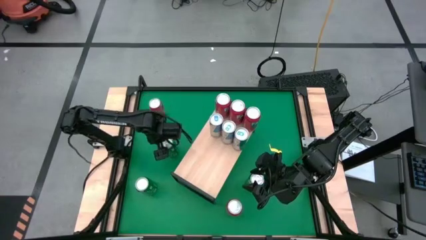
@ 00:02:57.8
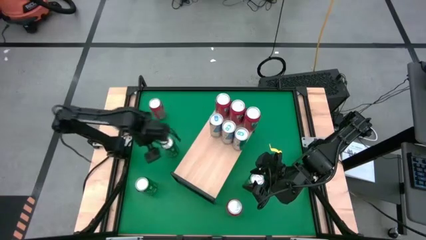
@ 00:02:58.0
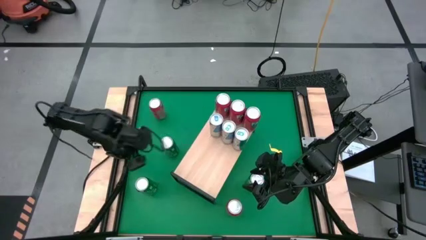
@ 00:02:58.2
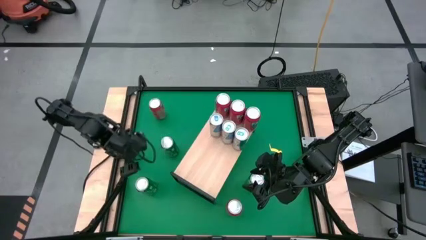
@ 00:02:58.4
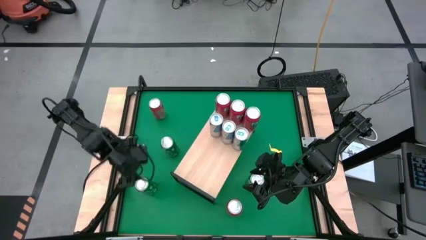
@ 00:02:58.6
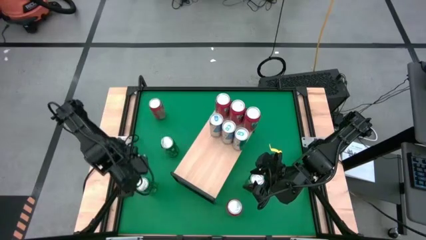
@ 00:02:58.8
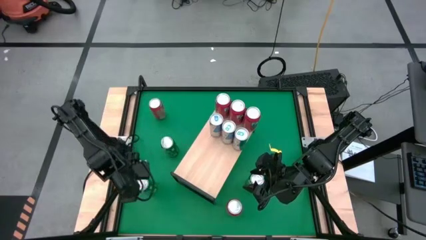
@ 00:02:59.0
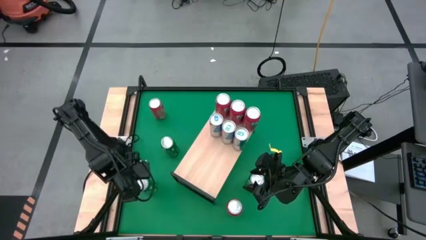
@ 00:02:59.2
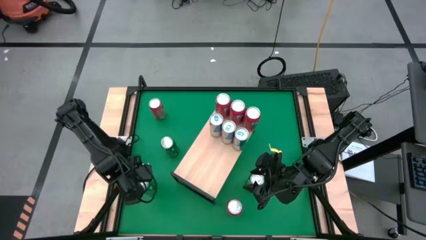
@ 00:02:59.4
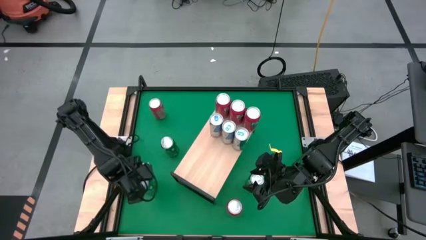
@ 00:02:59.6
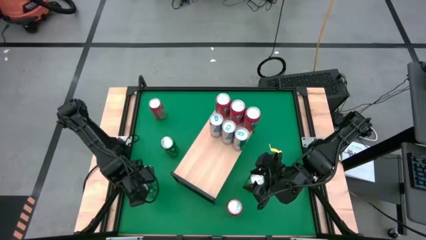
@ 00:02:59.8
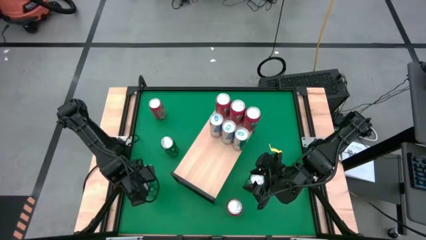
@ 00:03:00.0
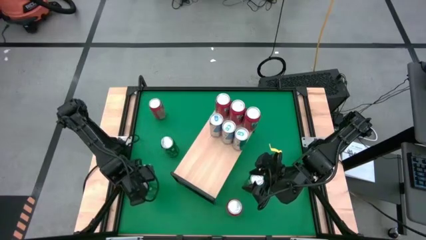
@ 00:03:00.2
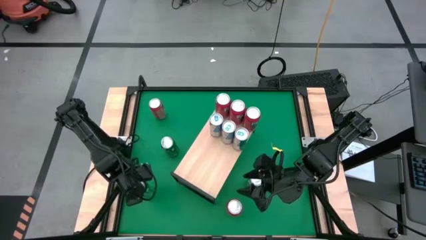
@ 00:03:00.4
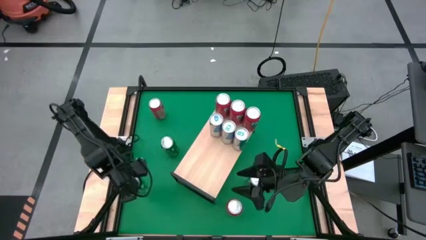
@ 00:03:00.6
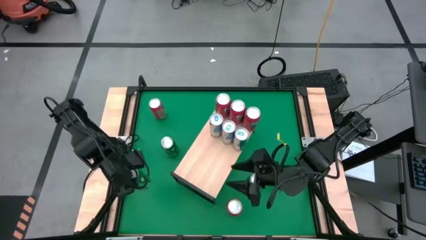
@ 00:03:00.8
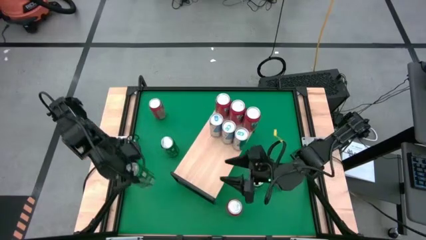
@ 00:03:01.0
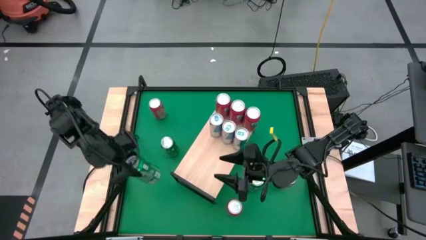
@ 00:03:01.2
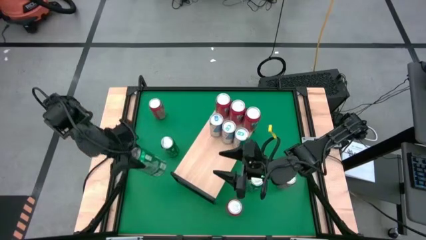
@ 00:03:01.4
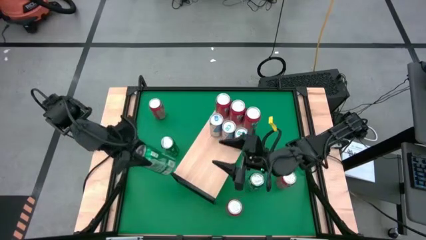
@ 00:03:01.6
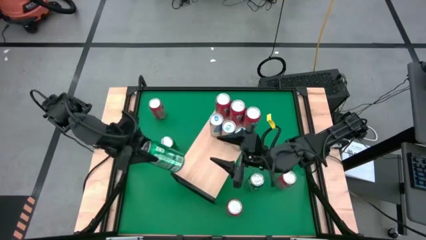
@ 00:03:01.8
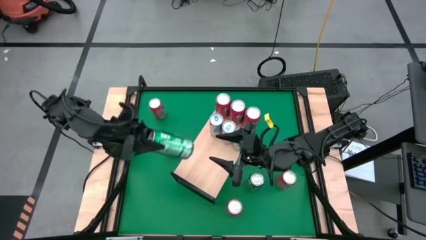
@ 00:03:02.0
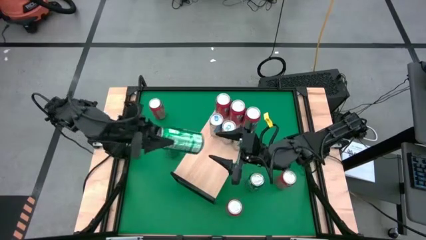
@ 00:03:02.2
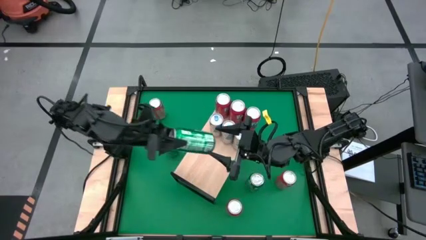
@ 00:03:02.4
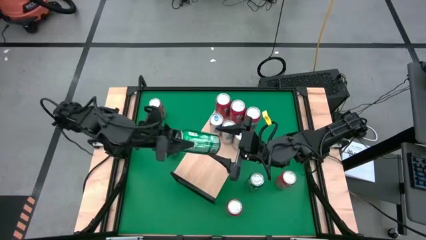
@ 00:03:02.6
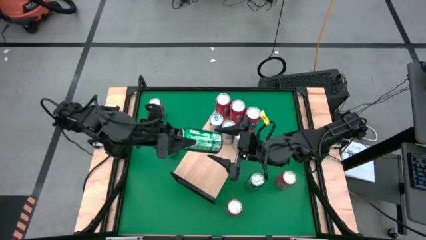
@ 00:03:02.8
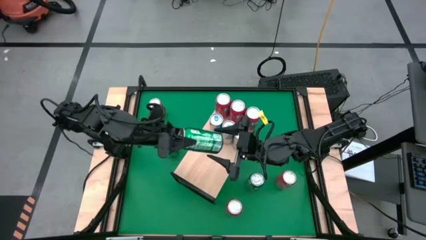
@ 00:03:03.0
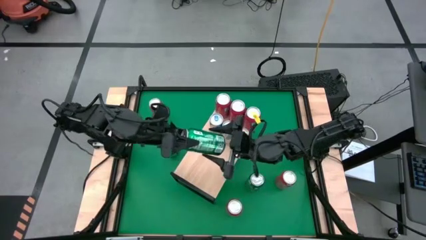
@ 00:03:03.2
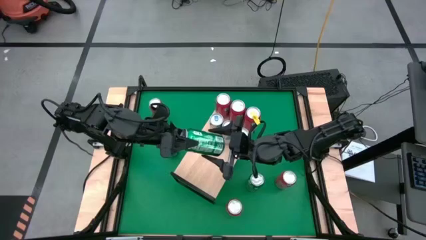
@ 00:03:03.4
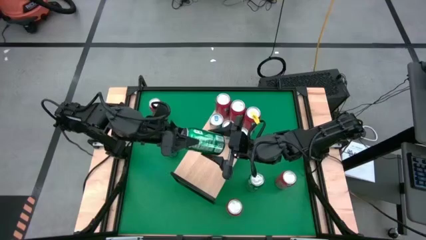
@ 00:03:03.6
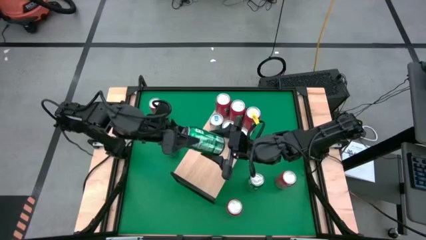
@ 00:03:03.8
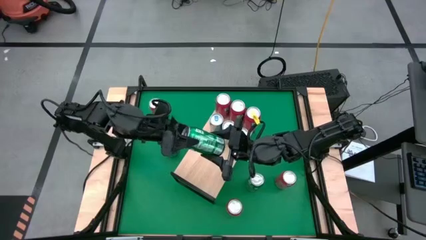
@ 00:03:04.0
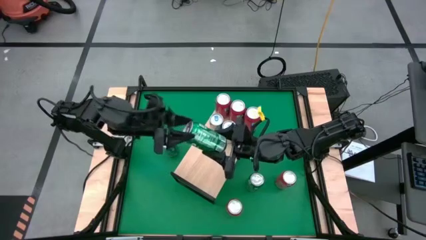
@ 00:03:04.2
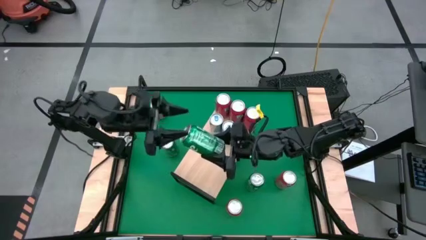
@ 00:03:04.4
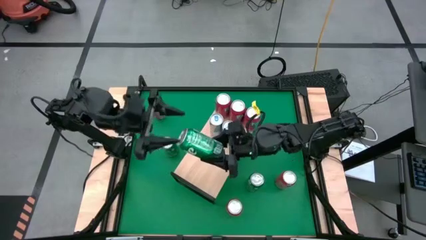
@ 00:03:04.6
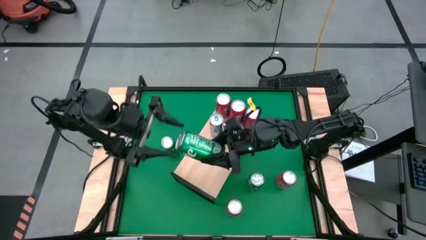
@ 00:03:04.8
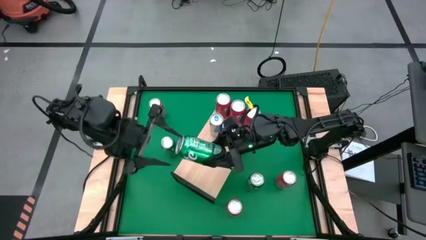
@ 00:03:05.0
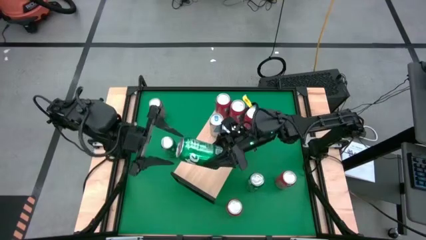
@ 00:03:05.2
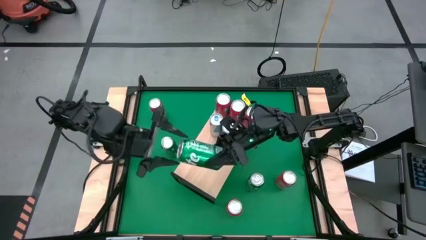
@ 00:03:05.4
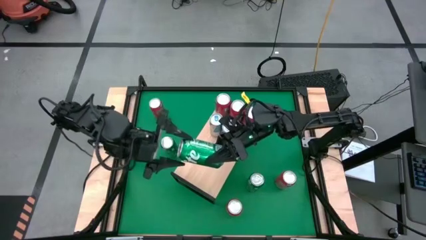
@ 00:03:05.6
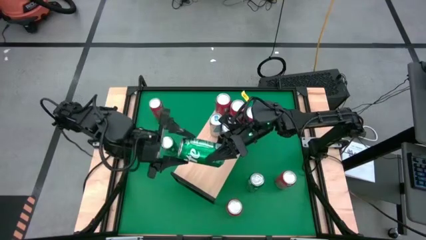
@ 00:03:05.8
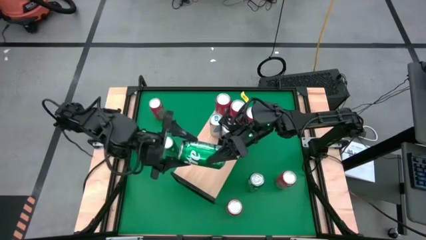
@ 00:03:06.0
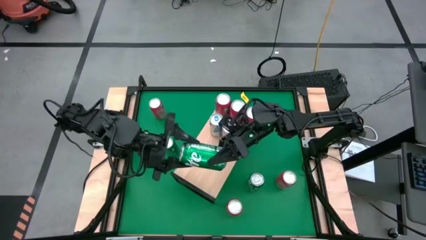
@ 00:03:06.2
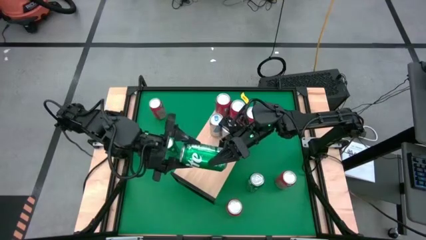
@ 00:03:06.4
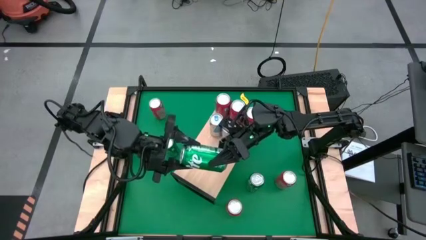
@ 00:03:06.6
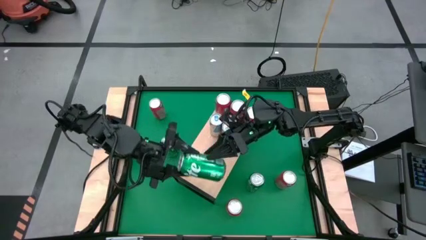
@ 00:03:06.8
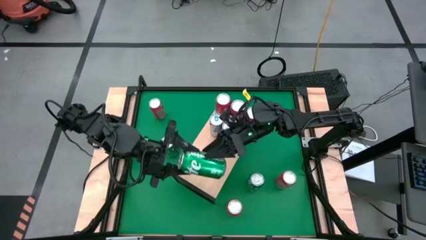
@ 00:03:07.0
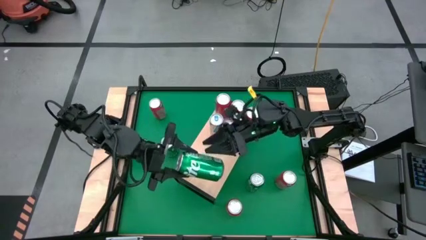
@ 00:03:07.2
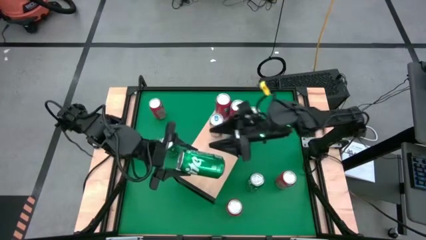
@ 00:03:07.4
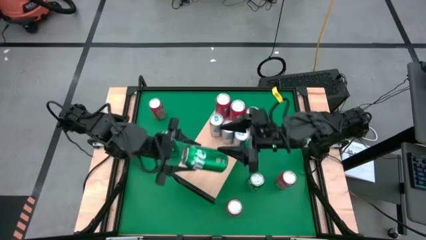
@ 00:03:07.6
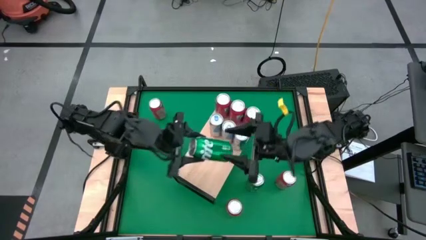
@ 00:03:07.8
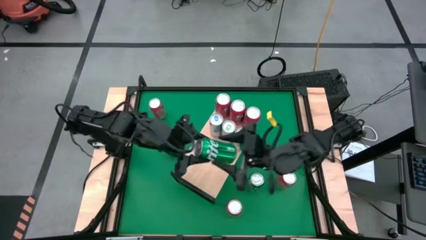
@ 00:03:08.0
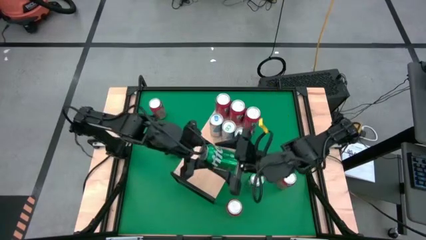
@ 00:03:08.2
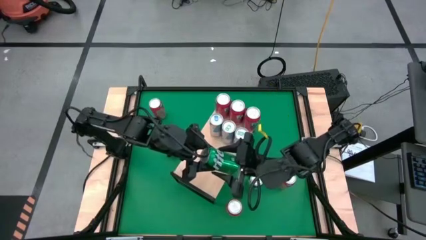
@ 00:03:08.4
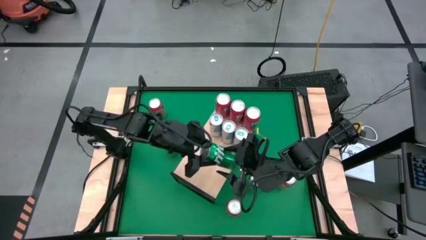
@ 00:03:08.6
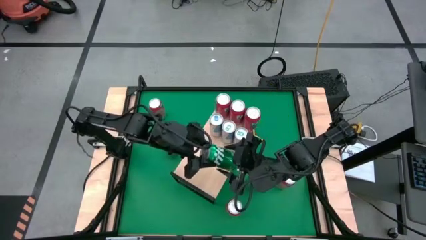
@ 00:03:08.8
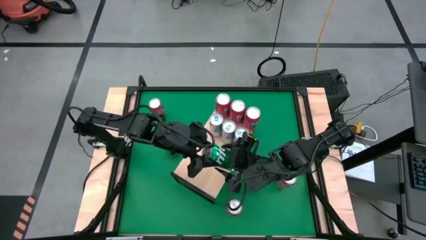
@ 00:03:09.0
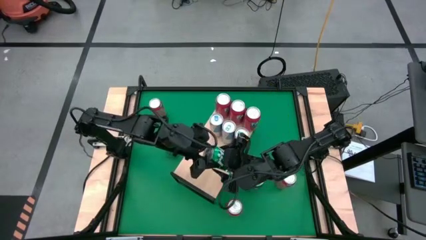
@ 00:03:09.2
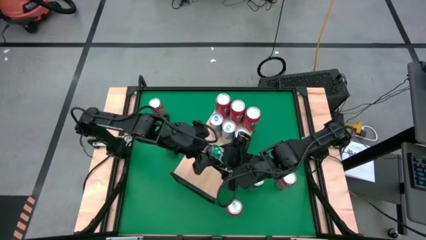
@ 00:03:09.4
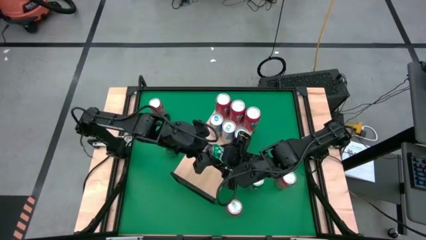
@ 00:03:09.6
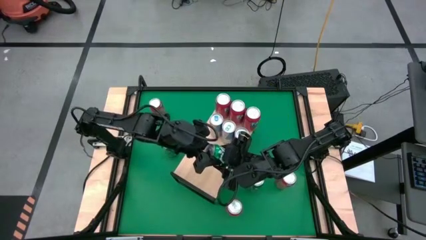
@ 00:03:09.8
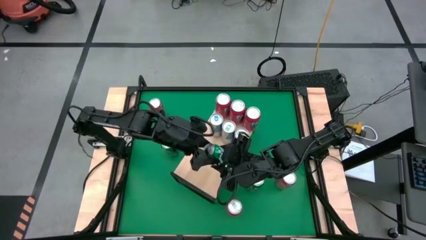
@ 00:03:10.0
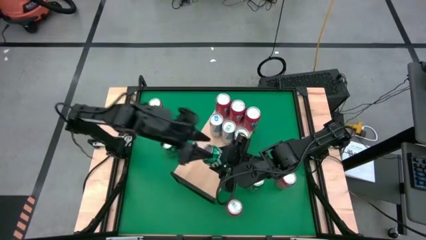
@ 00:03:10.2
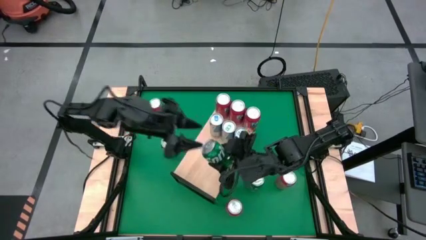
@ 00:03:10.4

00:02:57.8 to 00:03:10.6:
Task: Sort soda cans
Put the green soda can on the shelf

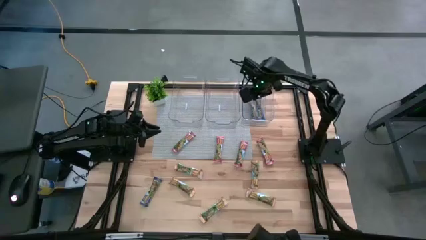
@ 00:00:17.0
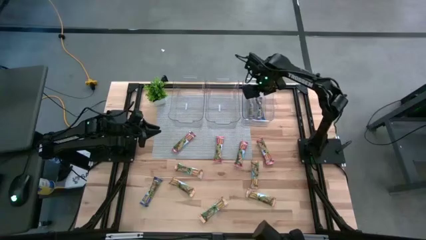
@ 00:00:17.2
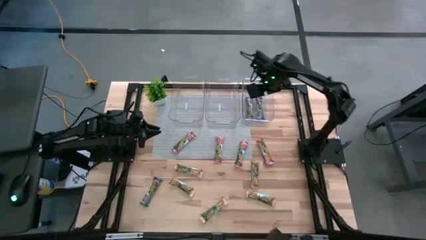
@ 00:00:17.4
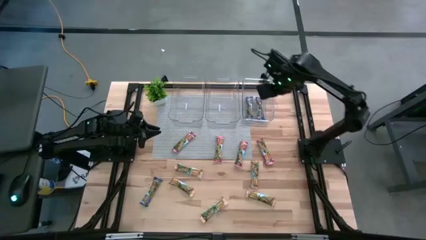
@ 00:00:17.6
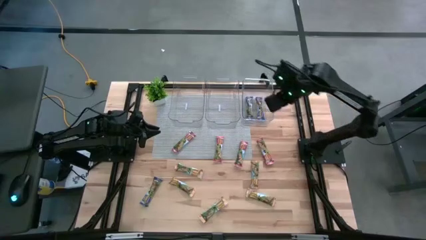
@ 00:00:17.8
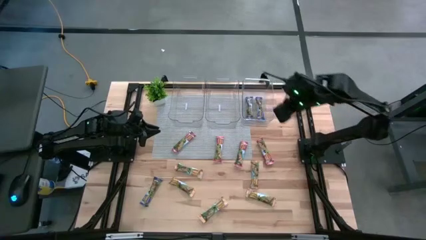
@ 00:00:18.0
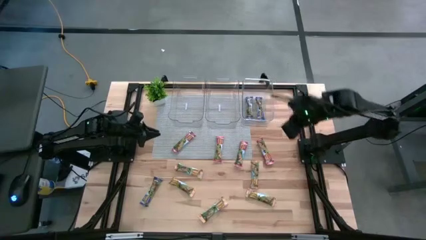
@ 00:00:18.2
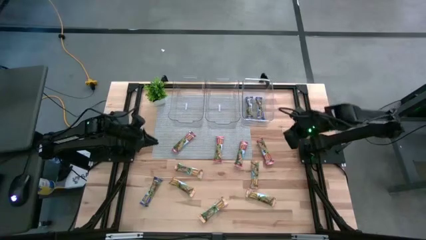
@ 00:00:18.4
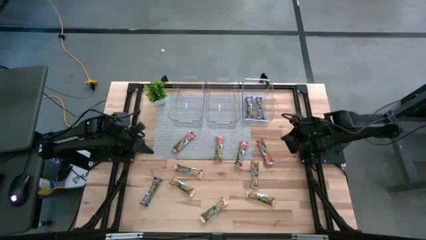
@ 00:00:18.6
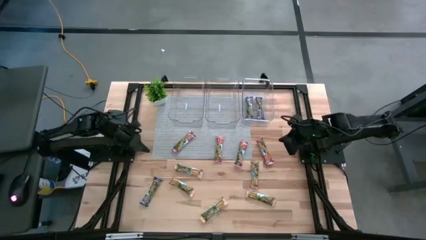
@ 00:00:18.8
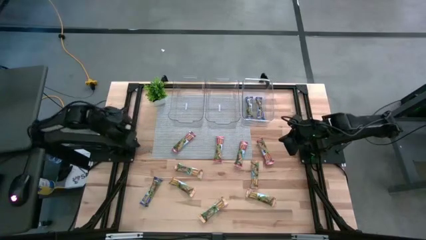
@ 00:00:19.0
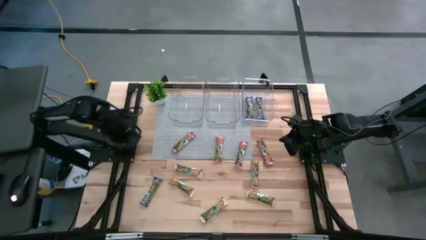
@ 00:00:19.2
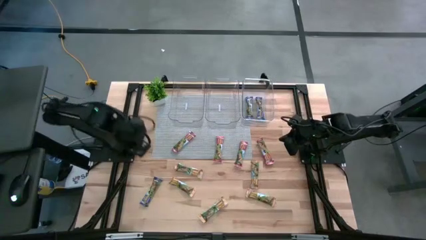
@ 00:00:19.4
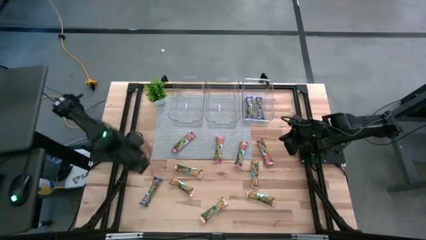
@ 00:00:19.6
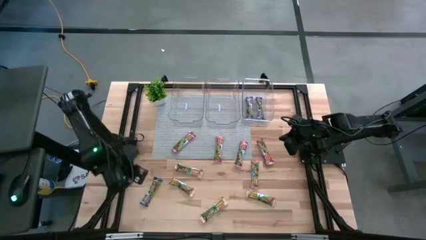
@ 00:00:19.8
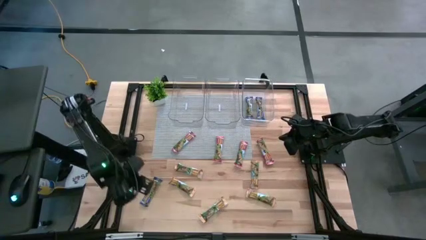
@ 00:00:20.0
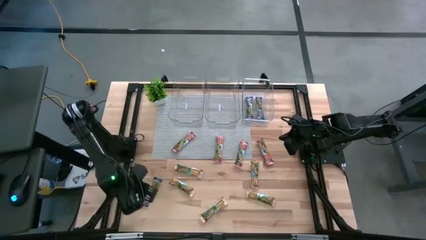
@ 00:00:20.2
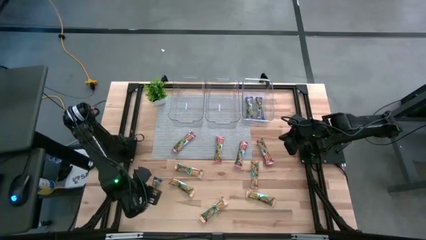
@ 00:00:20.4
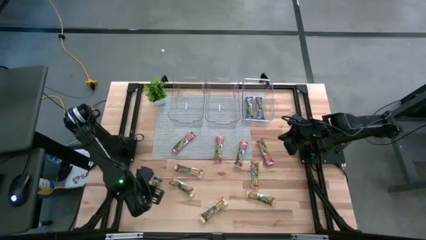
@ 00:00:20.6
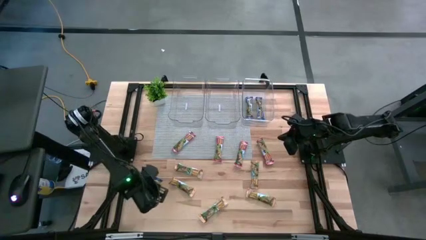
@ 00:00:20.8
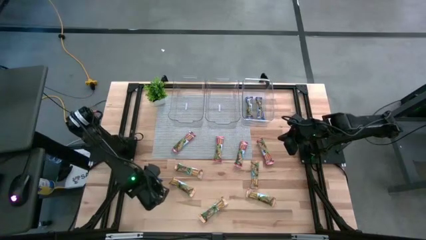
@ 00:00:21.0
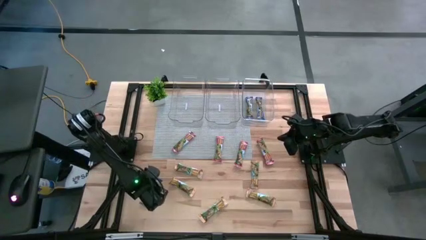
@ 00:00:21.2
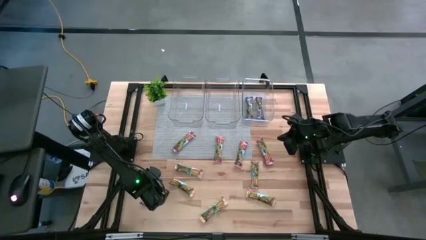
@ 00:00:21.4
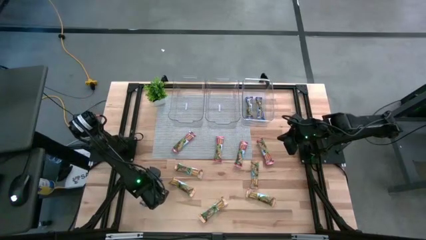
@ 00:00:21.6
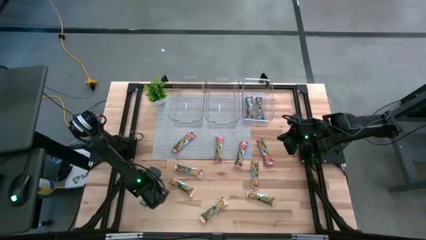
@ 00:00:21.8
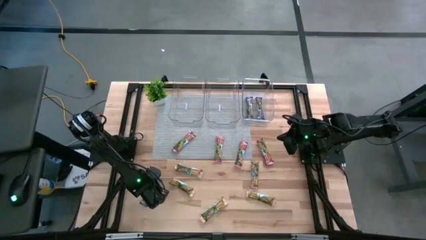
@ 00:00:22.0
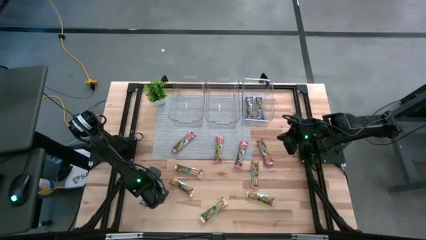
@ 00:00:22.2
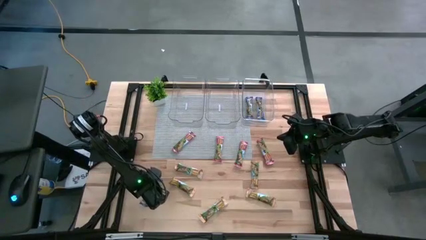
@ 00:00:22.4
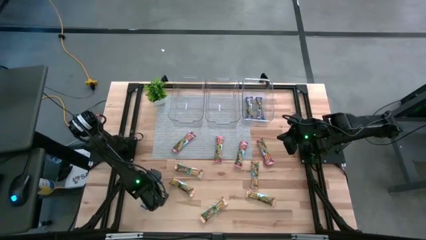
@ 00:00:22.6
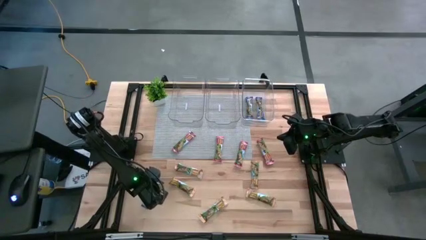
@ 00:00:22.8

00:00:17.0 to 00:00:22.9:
Task: Pick and place Granola Bars by type
Put the blue granola bar into the right transparent bin
